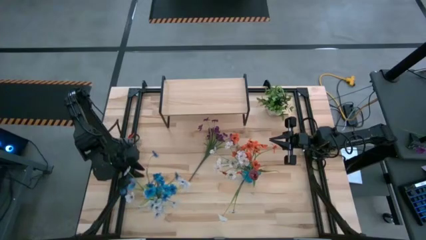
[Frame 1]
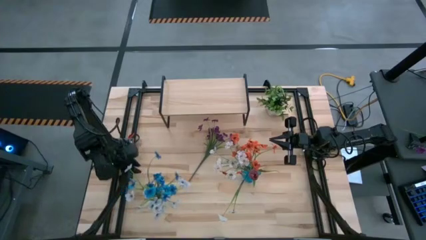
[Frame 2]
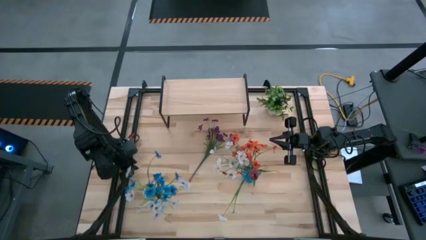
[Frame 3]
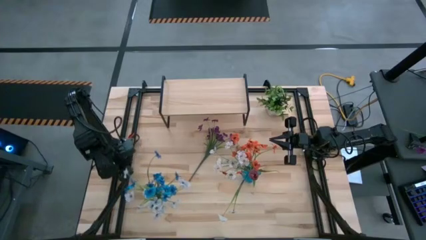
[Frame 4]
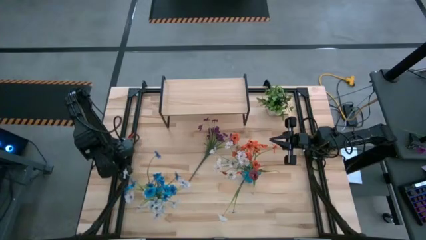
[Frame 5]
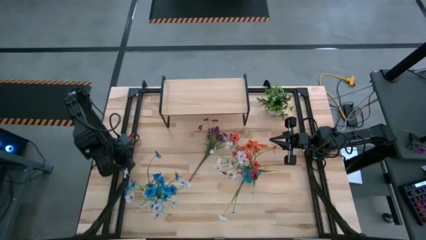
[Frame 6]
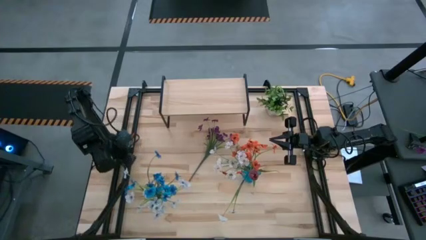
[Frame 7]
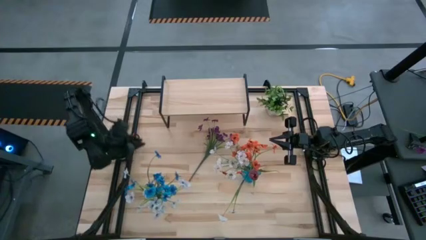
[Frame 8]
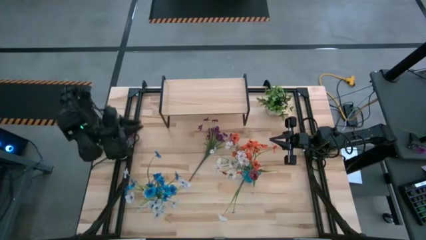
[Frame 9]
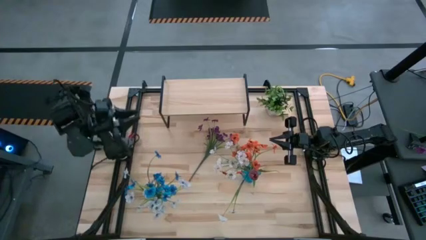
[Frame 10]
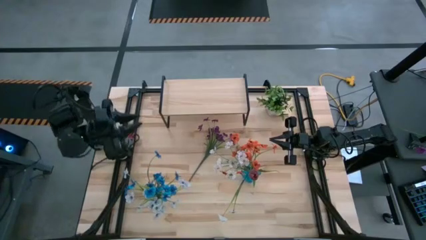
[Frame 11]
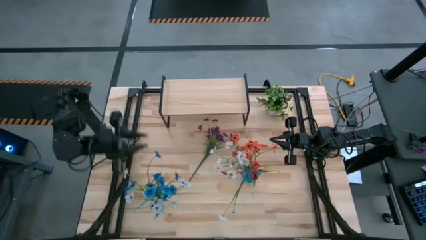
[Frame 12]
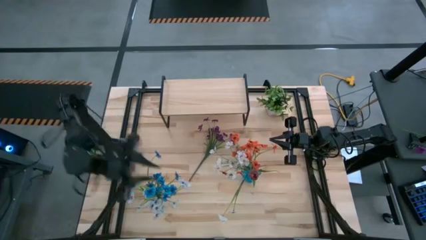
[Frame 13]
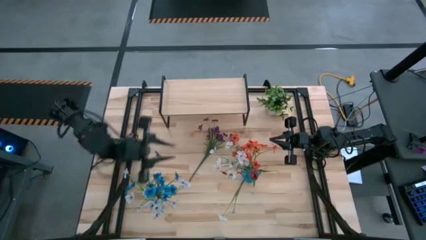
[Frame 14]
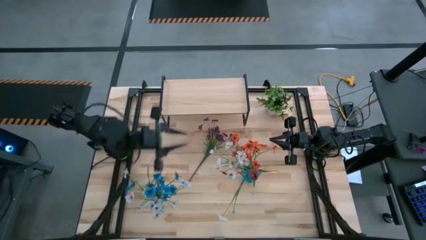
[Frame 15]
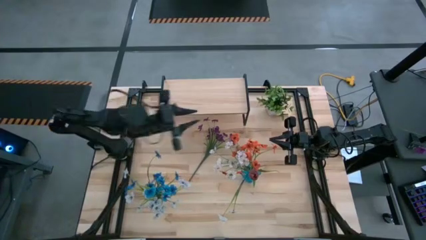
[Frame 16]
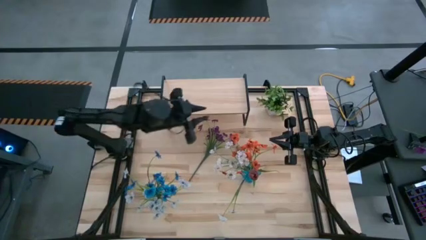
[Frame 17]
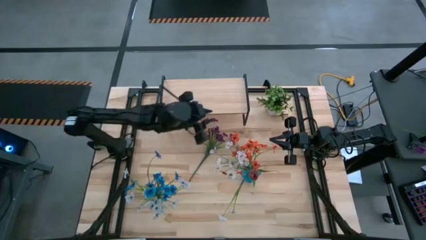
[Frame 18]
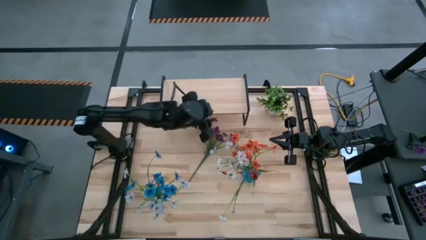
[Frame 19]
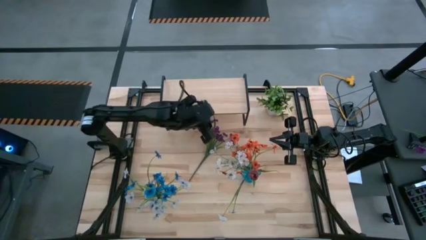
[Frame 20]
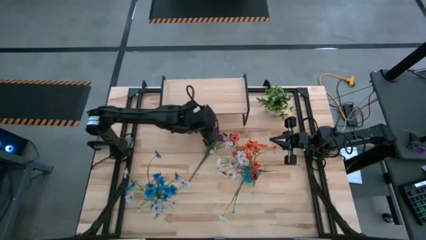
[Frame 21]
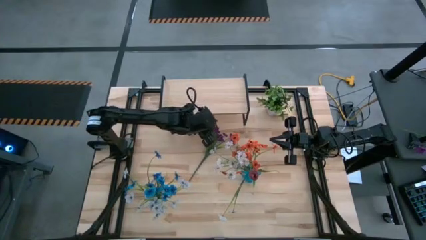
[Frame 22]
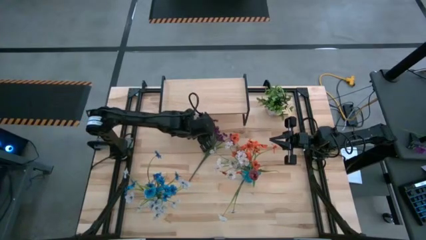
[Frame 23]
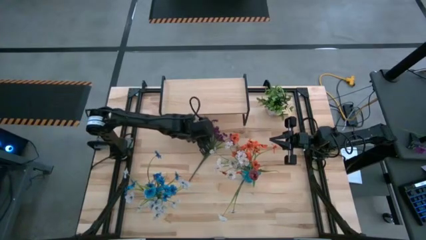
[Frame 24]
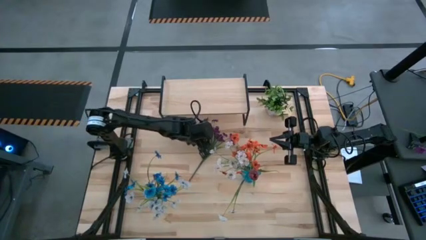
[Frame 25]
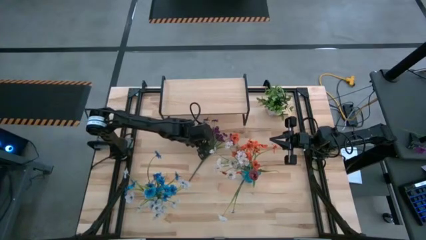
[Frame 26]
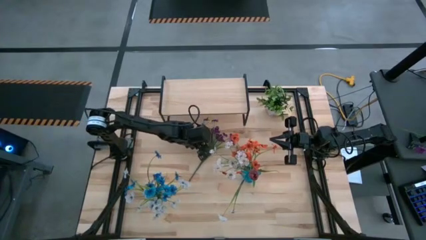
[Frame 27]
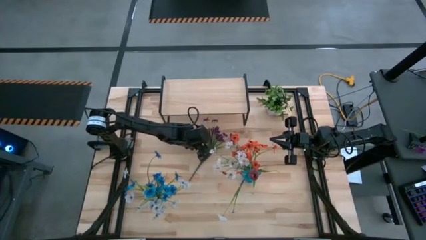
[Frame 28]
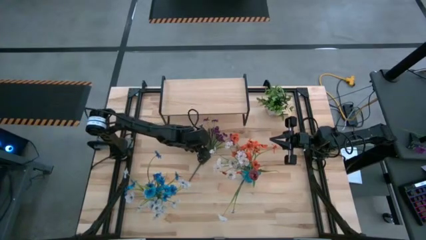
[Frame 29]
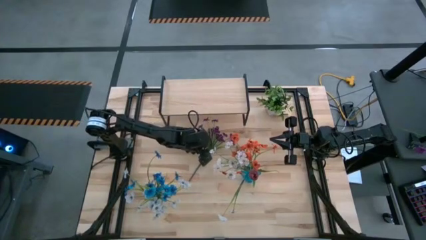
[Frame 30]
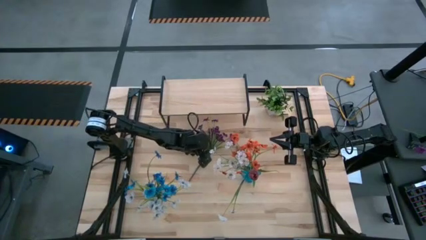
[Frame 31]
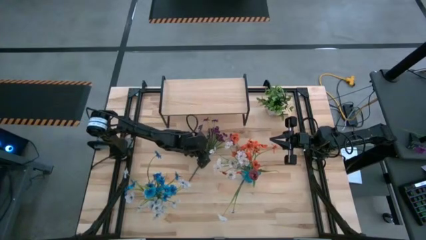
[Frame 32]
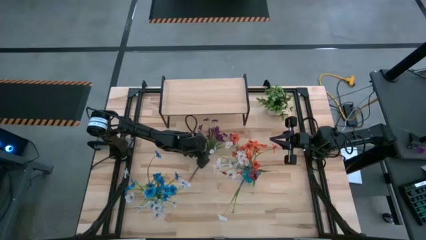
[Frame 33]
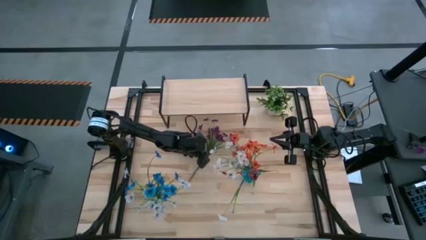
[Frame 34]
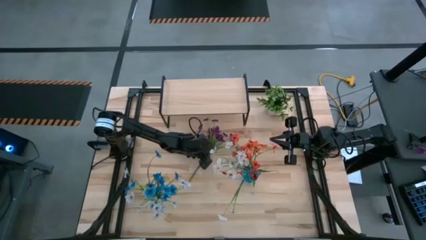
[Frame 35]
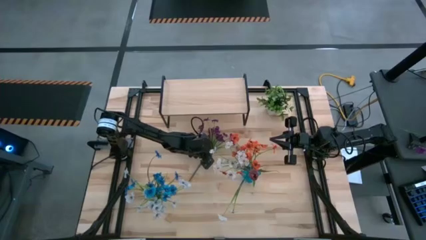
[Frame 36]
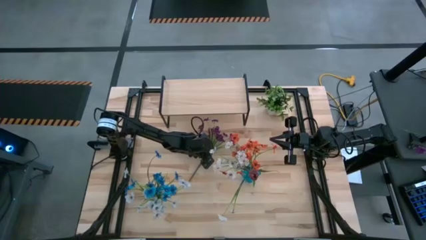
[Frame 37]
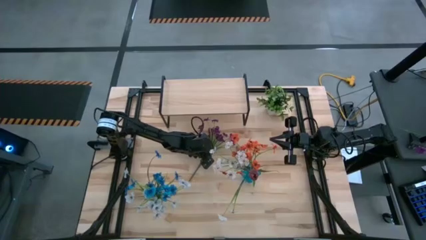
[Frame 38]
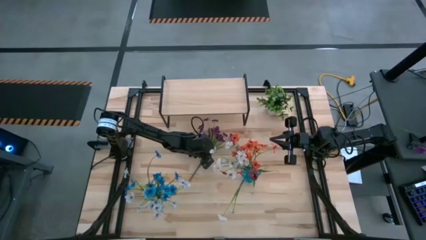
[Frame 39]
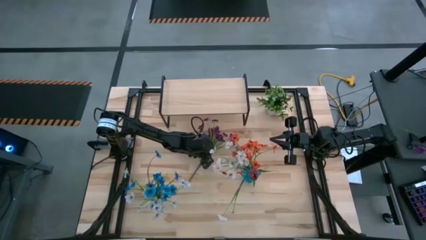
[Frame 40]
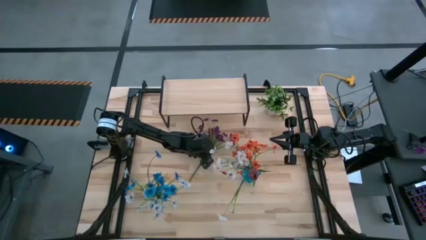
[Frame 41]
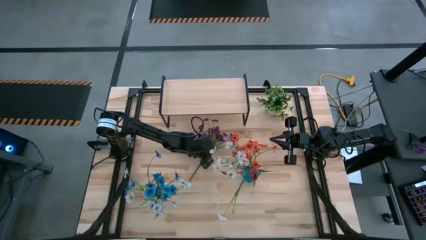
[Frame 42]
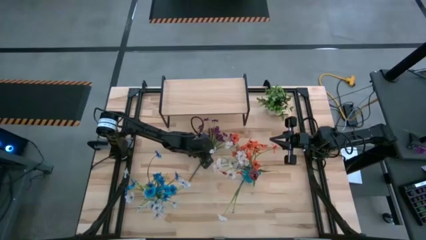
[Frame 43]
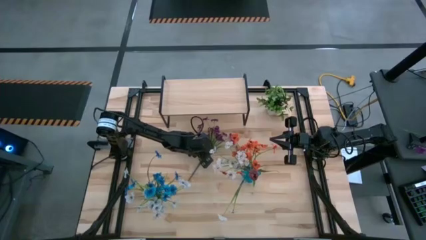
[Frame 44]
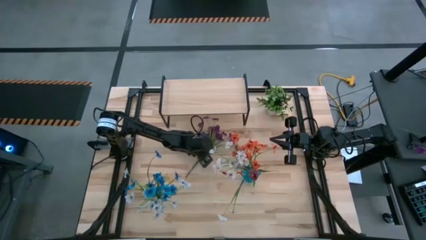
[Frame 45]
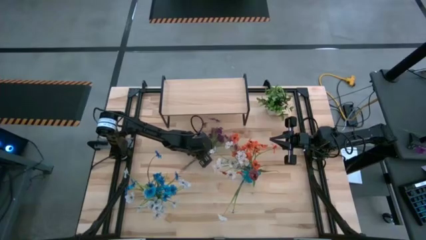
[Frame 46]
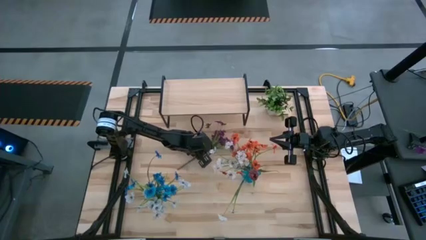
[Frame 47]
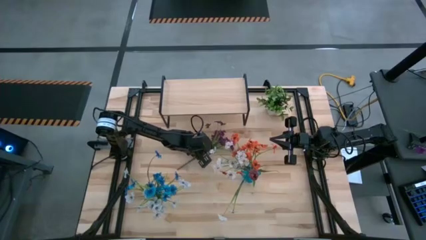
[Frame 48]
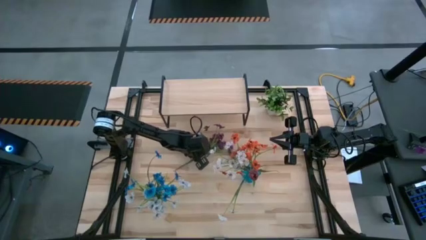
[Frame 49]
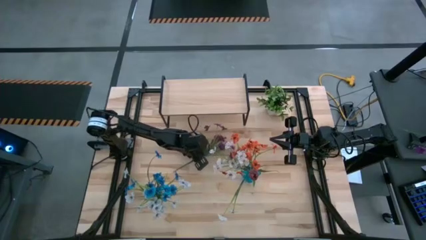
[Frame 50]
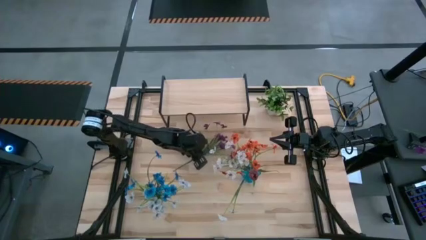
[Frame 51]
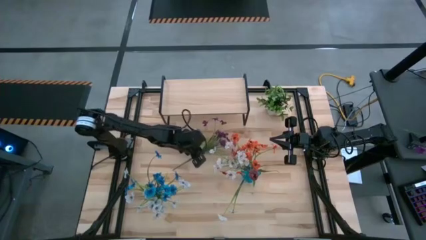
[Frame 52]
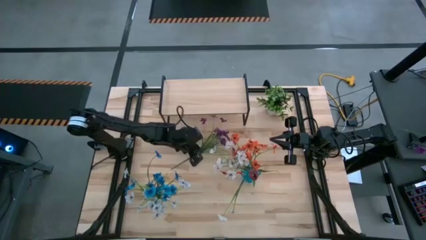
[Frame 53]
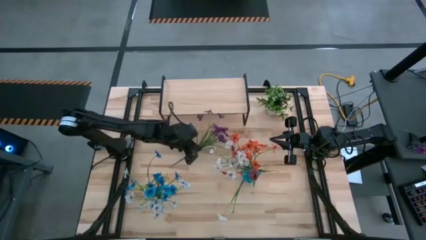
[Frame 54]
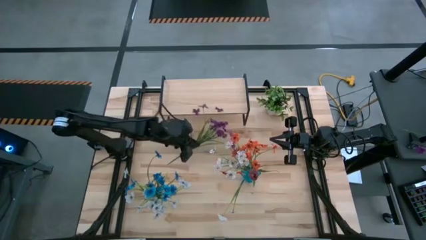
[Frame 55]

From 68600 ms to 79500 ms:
Task: Pick and place flowers into a vace then onto a shelf
Put the violet flowers into the transparent vase

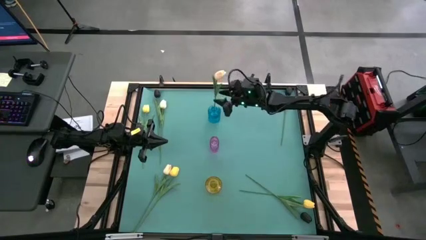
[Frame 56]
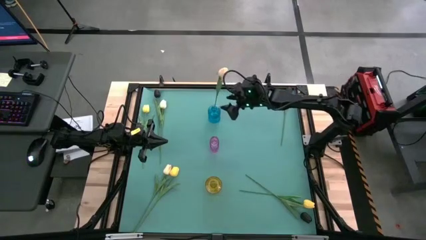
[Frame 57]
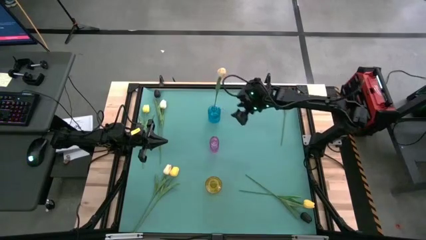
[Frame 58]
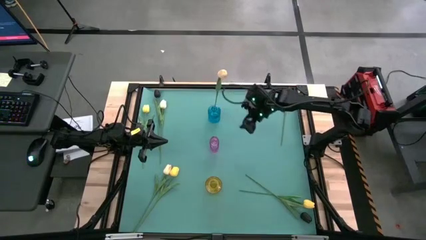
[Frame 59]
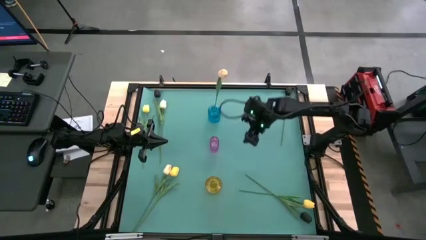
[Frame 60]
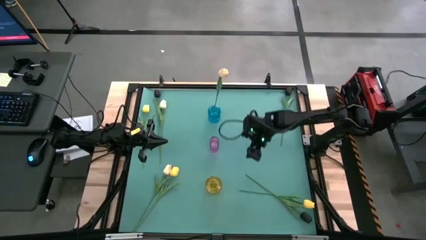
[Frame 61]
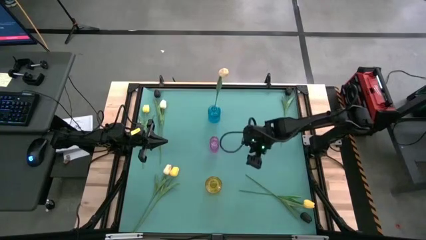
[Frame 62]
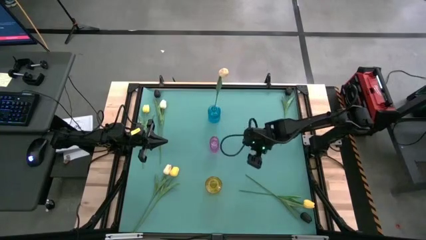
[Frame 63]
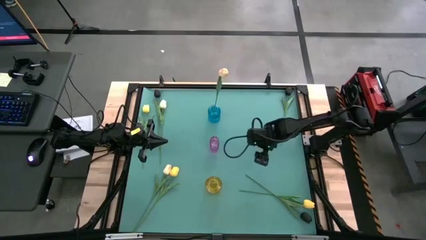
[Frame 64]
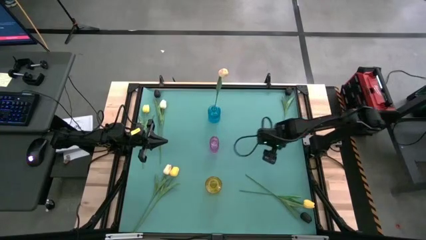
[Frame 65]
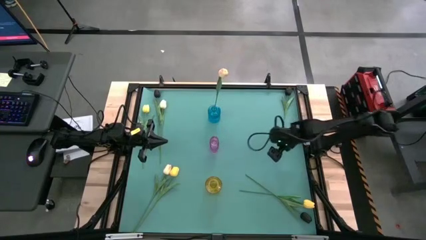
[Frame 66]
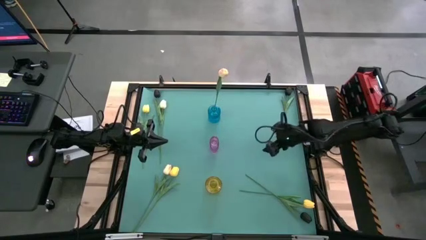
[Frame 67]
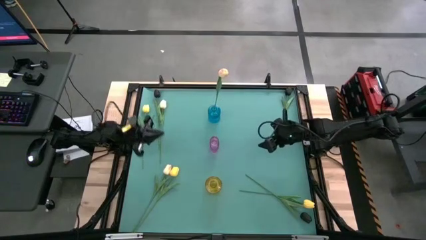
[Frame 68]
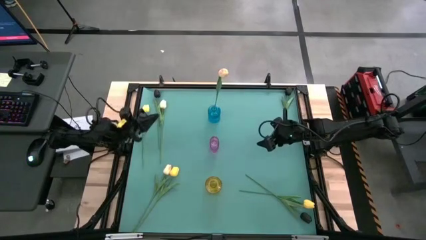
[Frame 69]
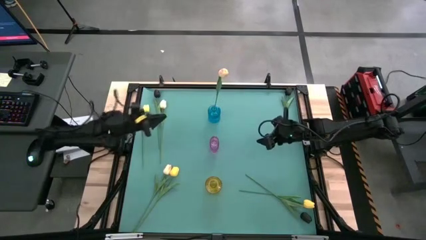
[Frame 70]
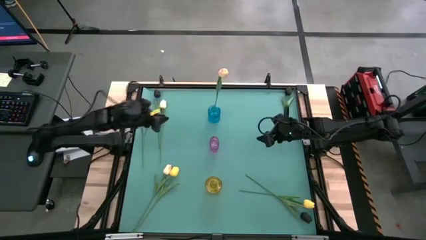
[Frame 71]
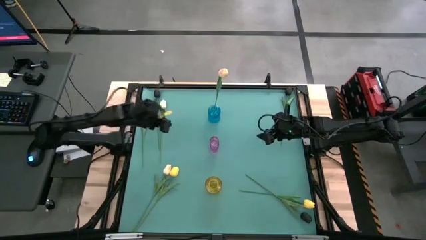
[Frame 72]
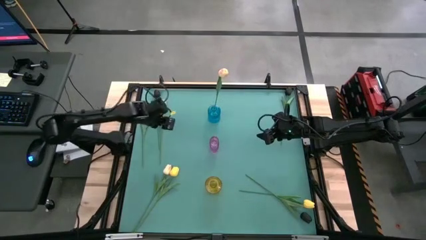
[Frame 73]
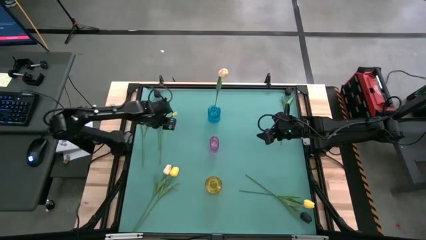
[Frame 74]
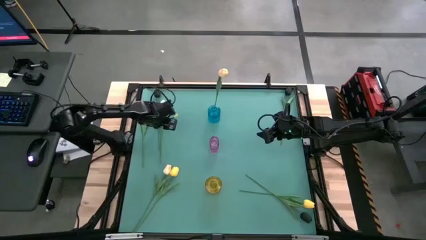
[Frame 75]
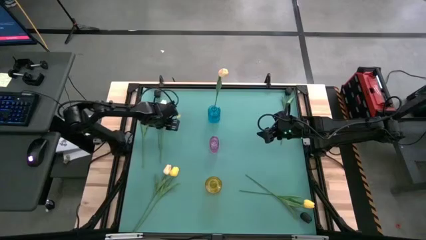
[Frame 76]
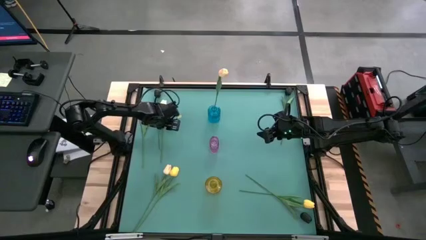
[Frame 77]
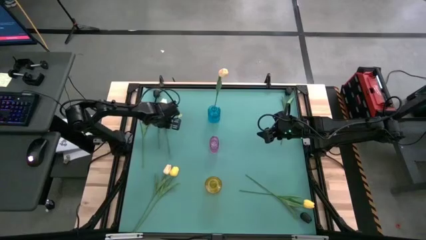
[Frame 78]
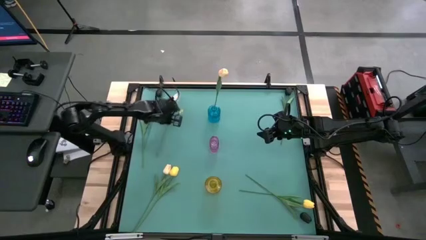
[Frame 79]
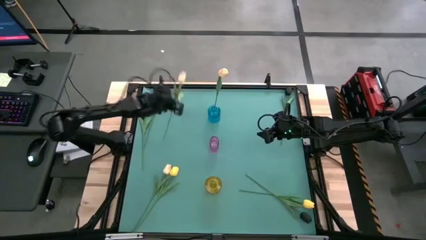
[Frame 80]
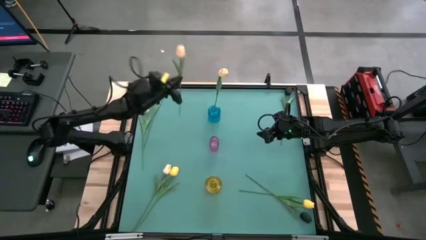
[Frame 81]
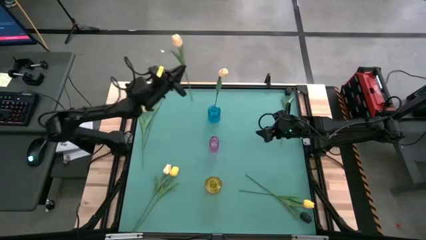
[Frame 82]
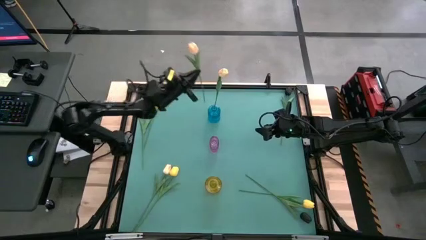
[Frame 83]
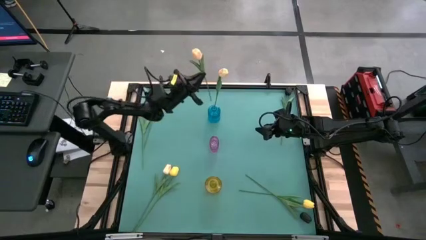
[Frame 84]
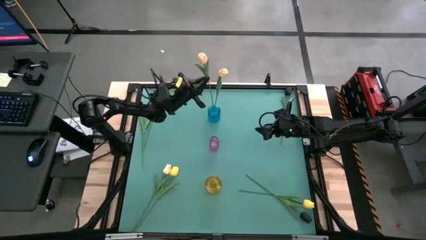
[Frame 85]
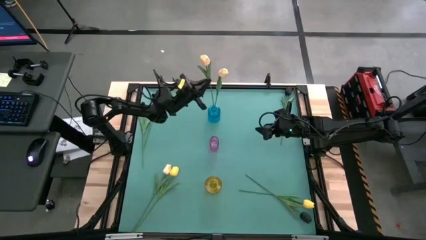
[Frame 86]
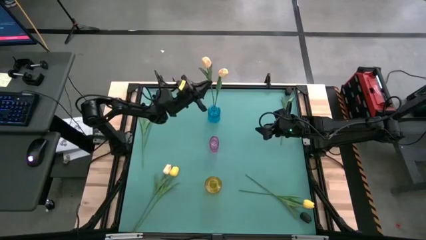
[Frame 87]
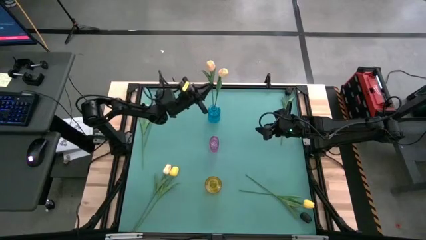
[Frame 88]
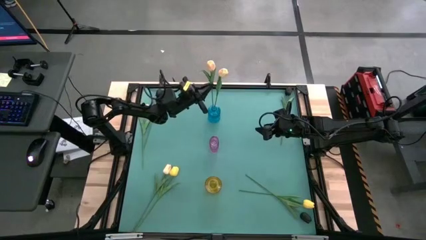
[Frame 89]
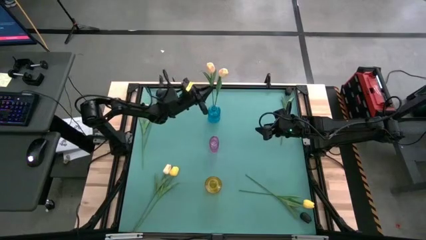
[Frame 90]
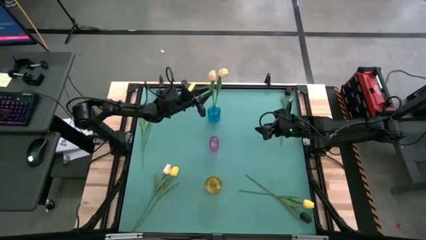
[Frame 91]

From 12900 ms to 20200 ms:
Task: Sort flowers into vase by color
Put the top white flower into the blue vase
